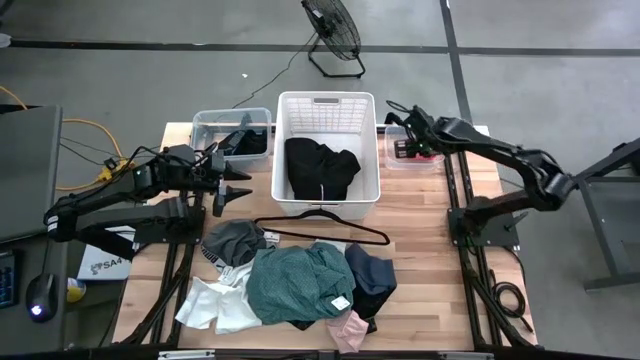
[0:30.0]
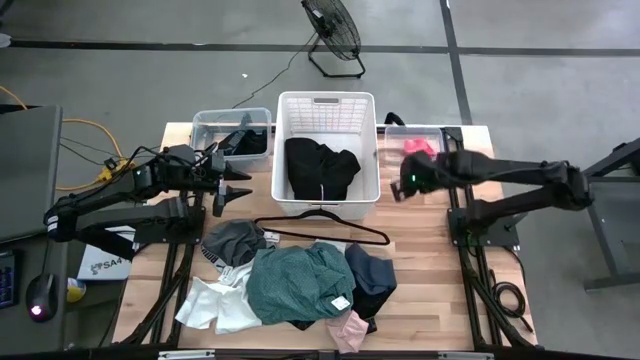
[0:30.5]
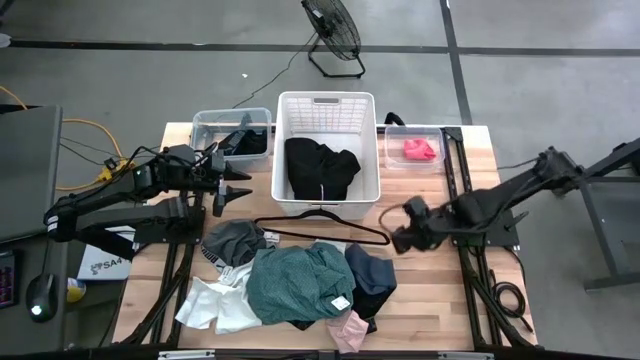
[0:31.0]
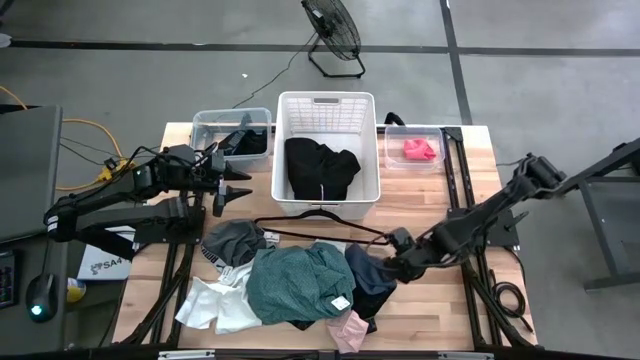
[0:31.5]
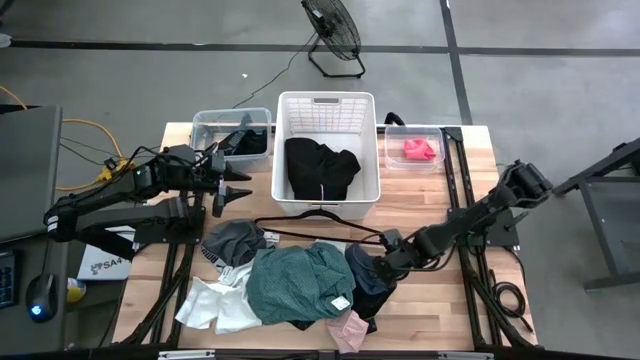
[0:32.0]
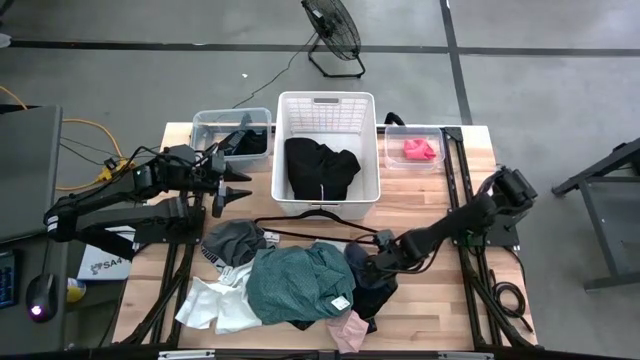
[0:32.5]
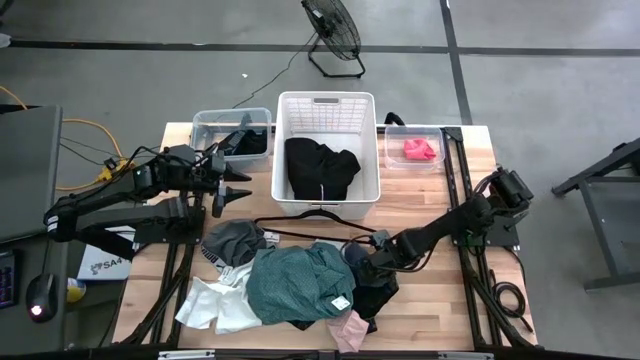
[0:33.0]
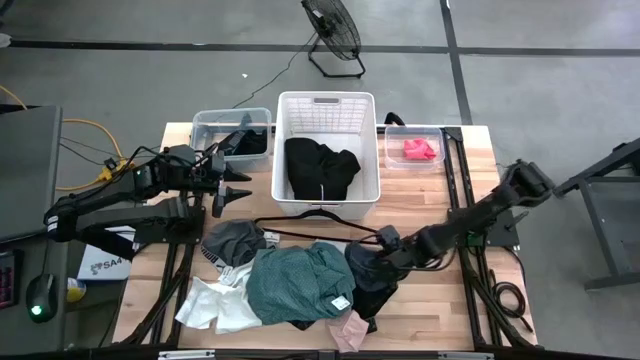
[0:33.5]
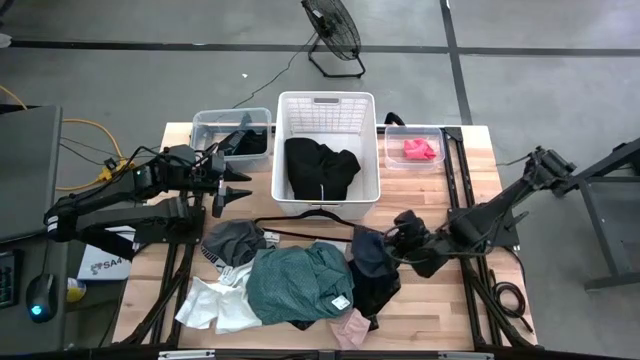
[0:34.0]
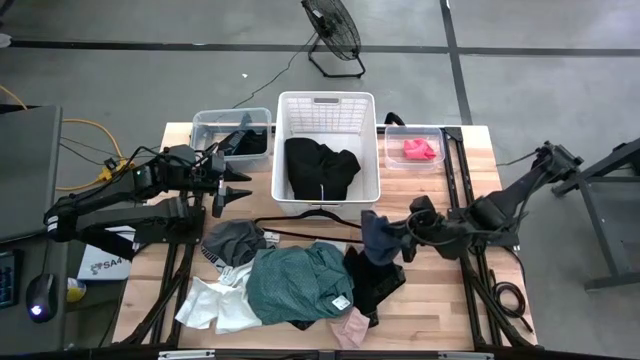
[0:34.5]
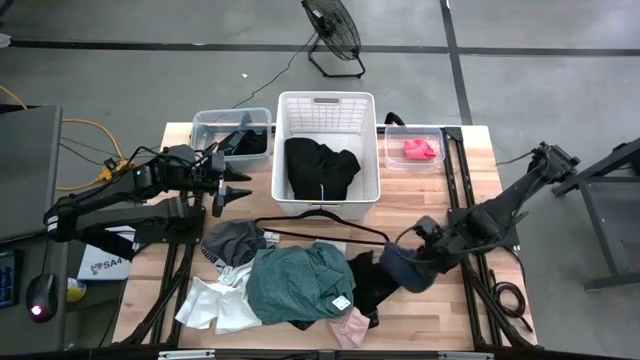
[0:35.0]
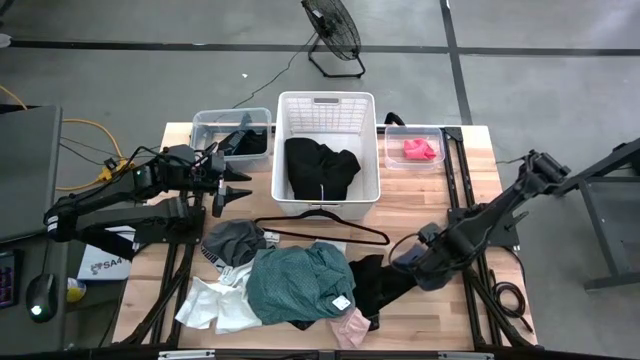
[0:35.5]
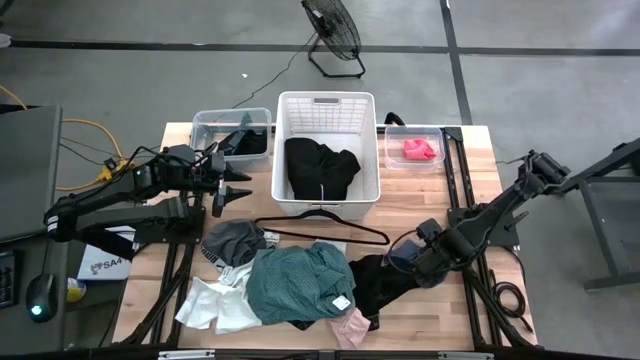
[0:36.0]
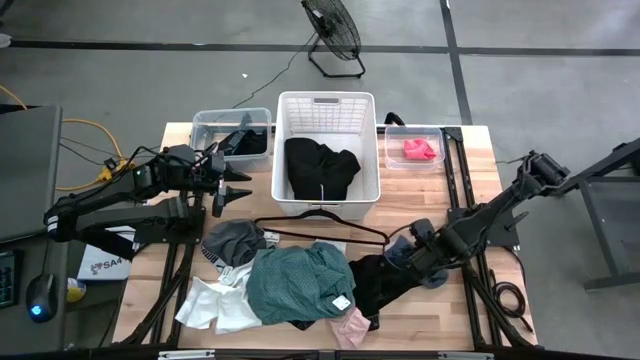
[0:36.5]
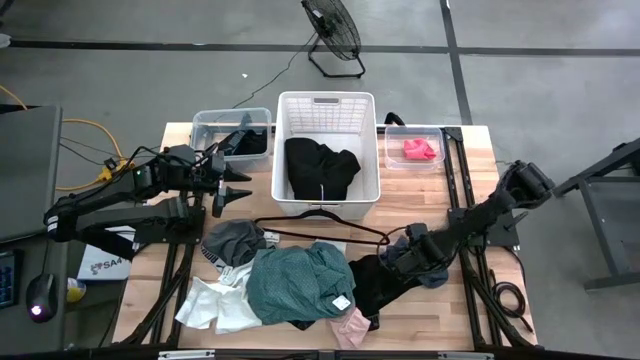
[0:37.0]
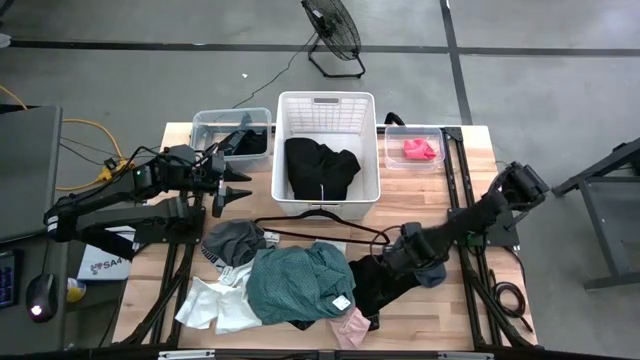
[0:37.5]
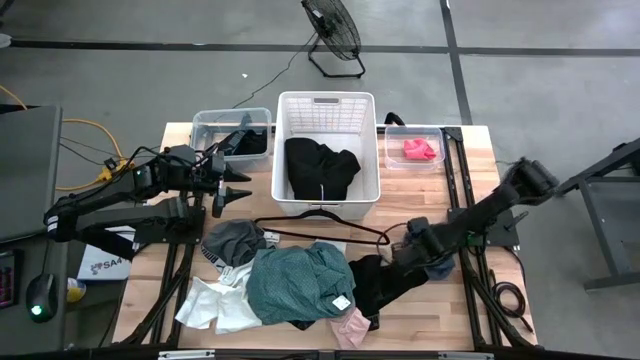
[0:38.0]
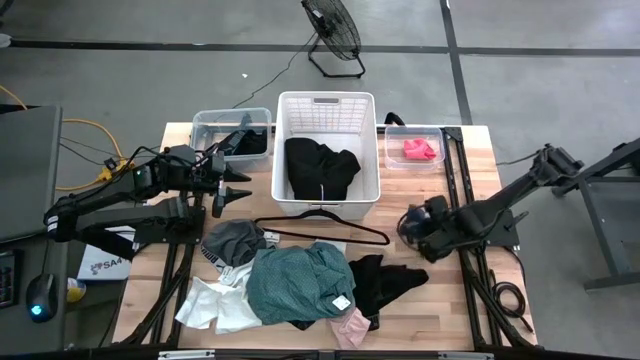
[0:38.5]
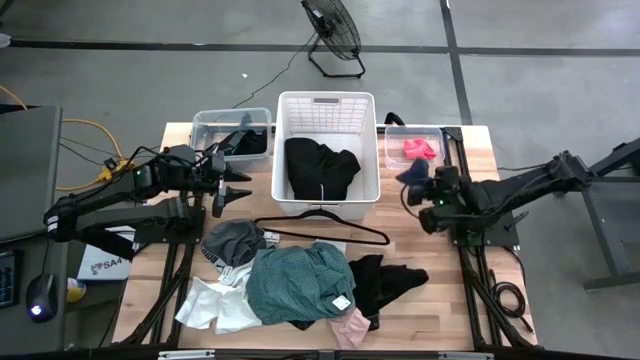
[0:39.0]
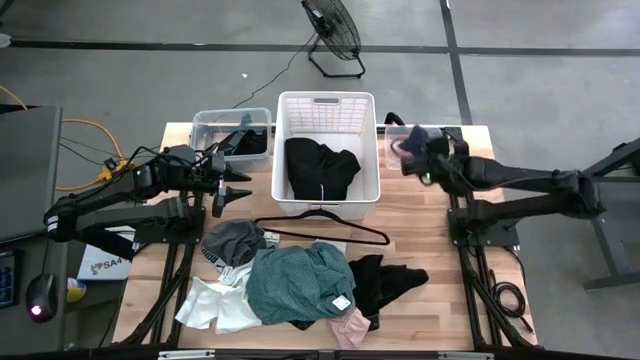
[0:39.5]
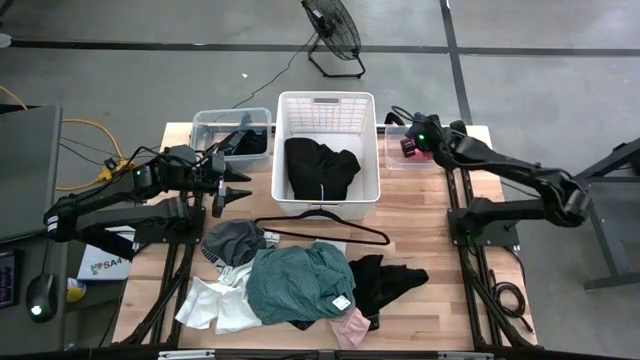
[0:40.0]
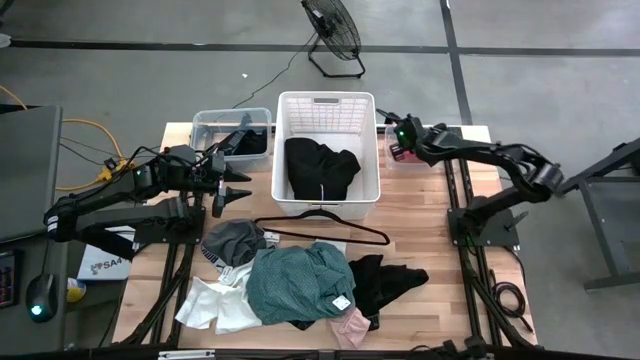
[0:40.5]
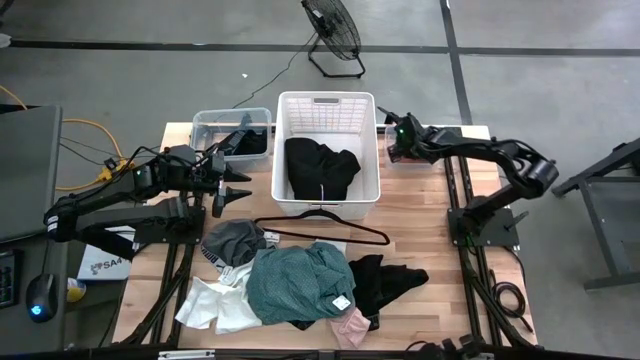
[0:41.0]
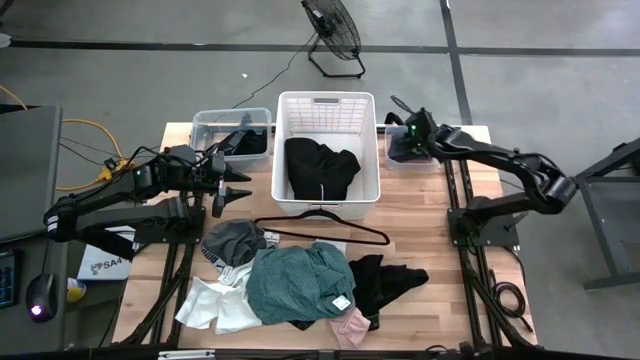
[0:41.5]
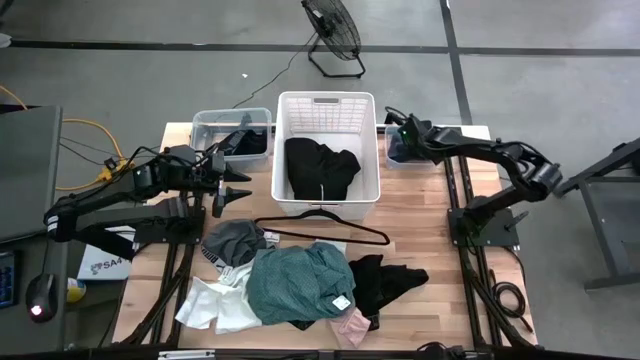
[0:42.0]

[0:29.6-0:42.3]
Task: Pick & Place Cloths
Put the blue sock into the right transparent bin

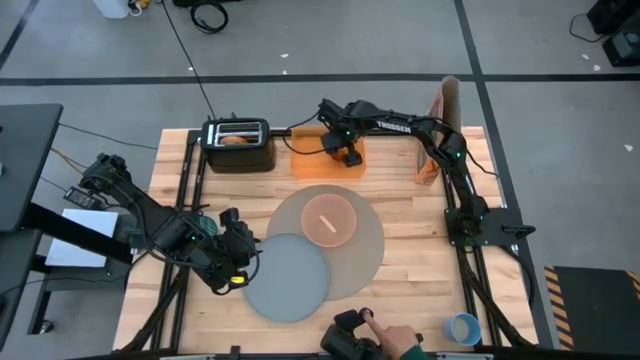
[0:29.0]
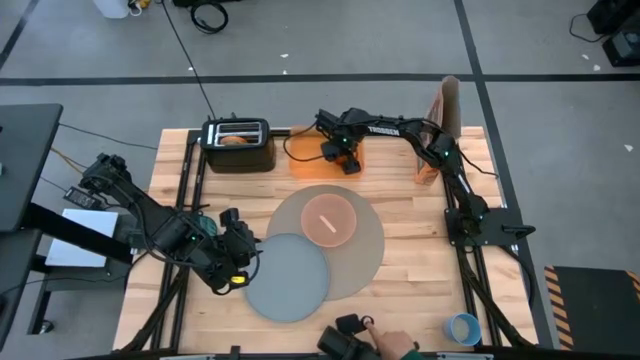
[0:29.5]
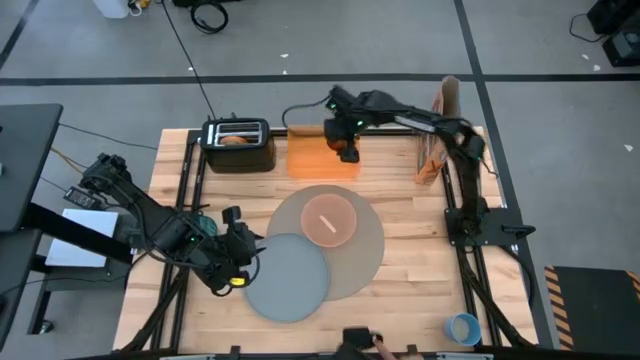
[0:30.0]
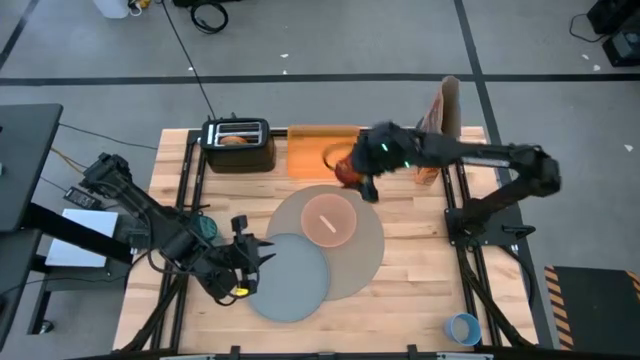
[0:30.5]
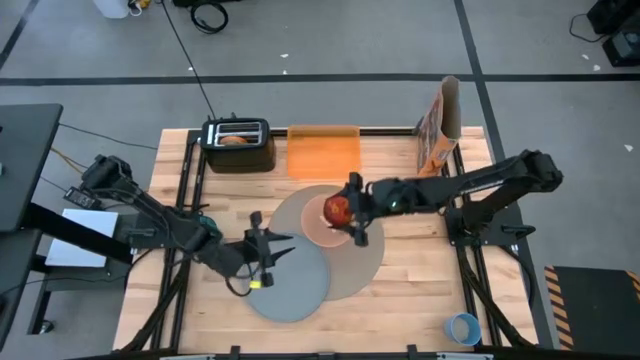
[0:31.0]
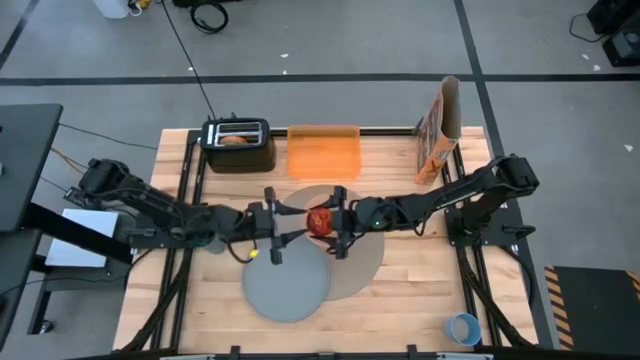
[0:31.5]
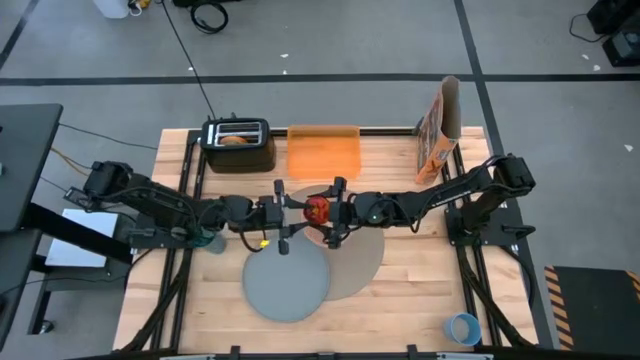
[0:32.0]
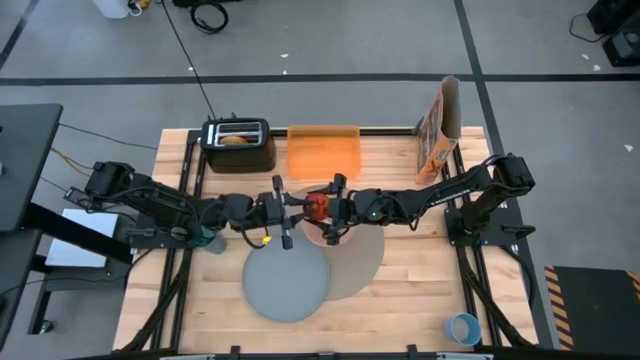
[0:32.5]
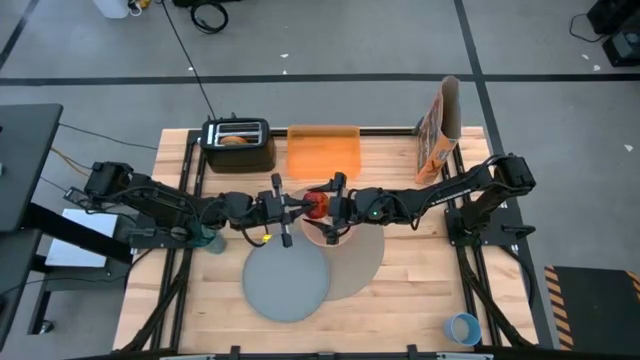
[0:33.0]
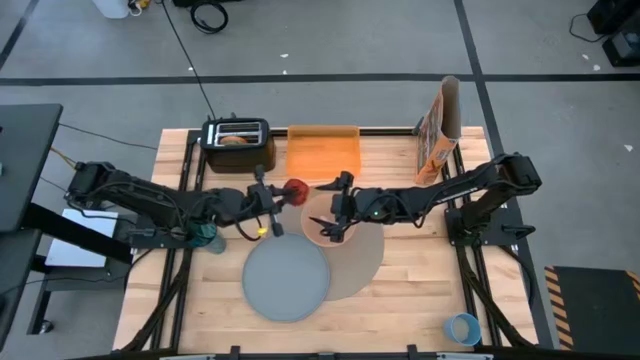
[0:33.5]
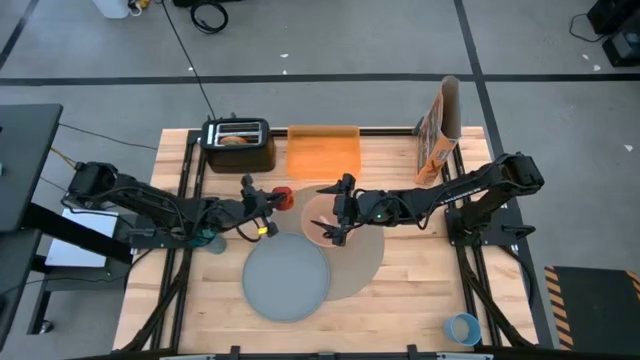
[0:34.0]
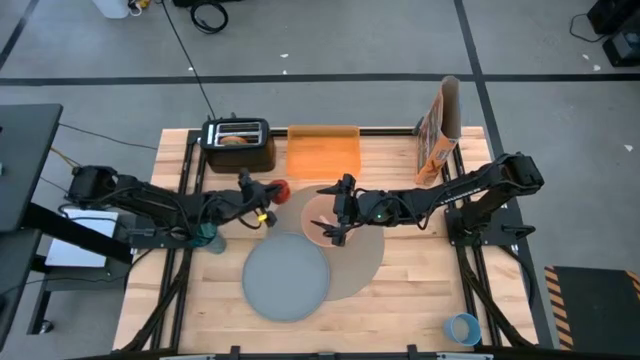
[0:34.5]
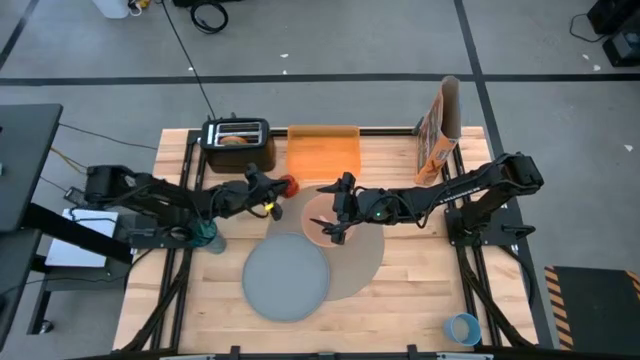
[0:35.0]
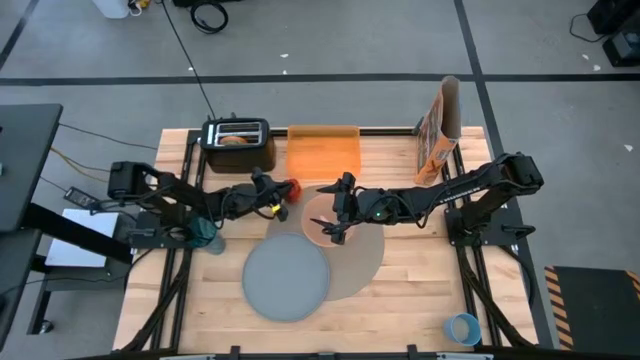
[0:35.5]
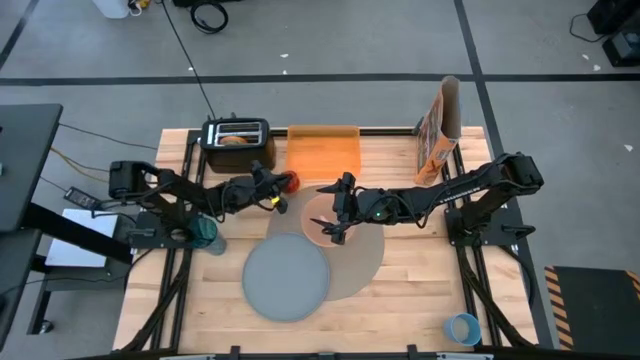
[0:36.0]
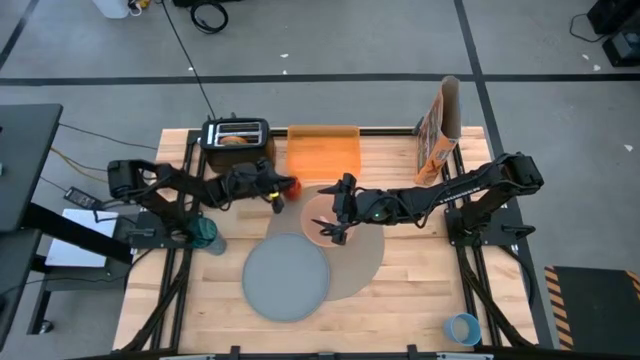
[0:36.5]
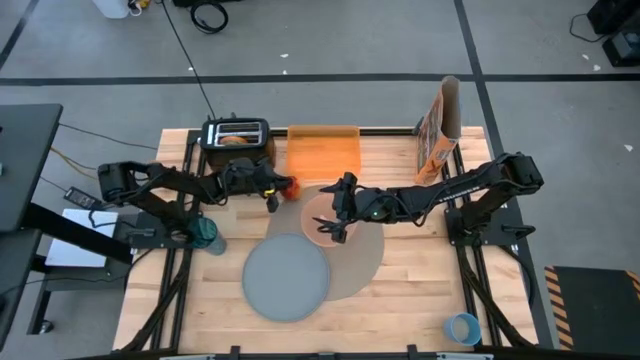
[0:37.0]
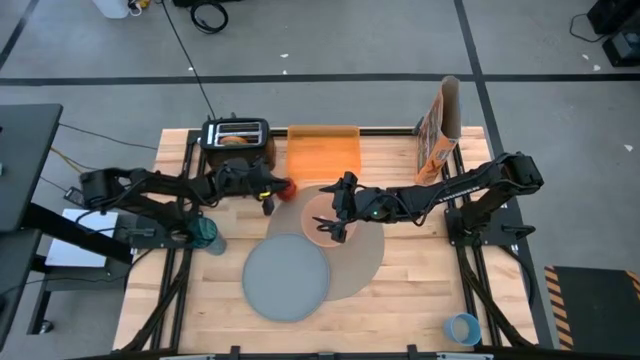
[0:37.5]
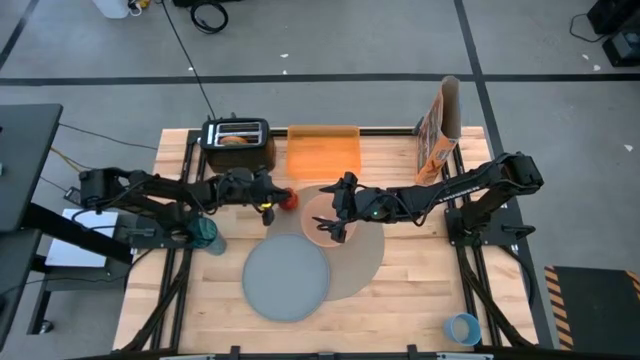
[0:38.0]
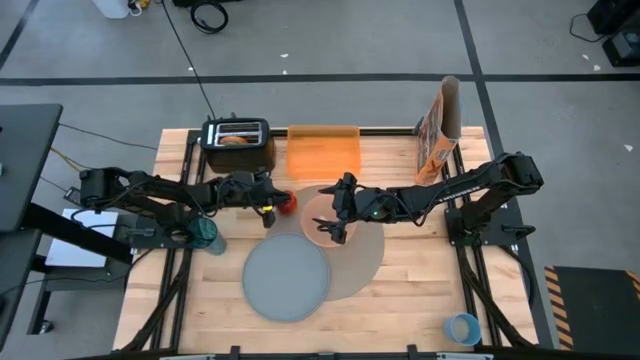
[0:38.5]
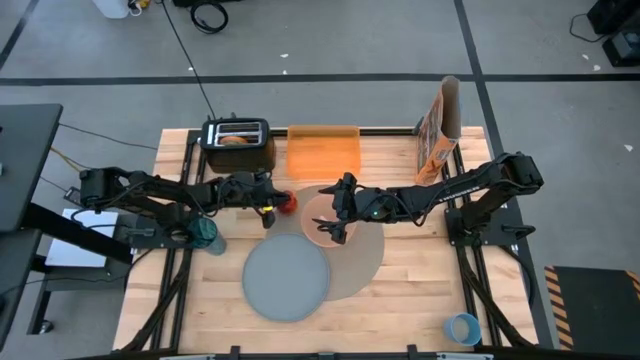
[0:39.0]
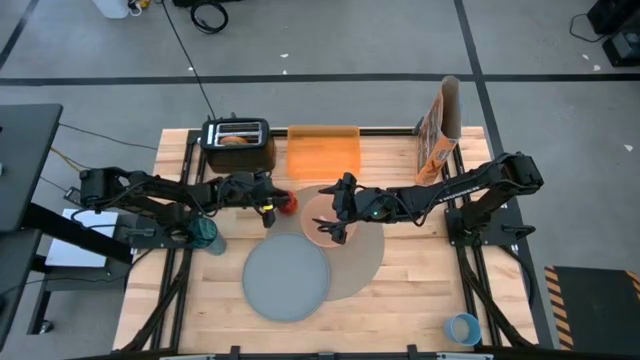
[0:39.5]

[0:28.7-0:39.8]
Task: Arrange a breakfast setting
Put the red apple on the brown tablemat
